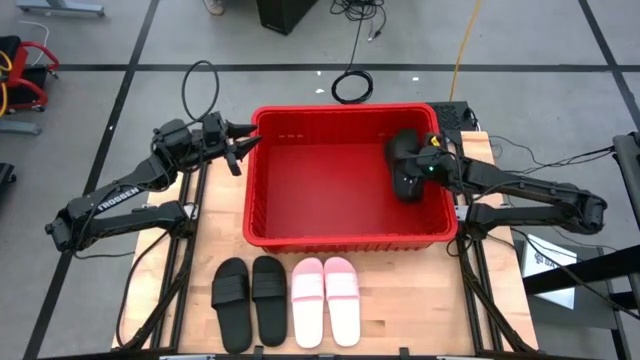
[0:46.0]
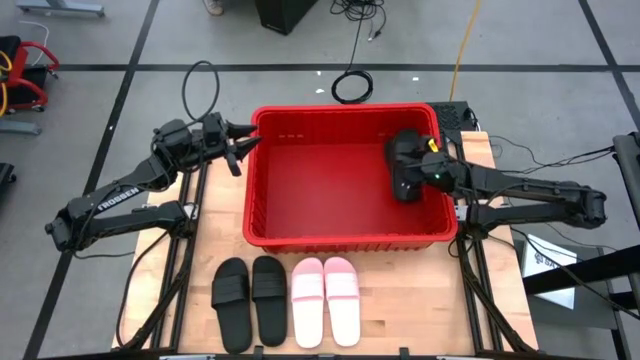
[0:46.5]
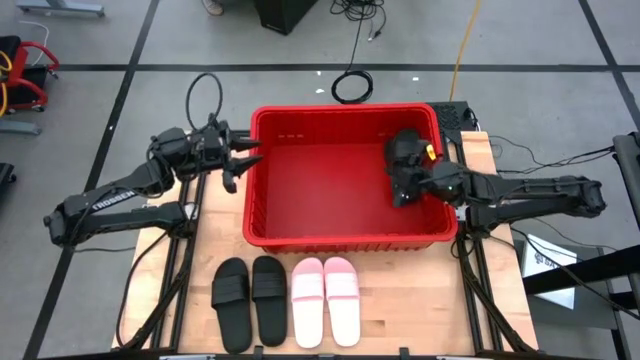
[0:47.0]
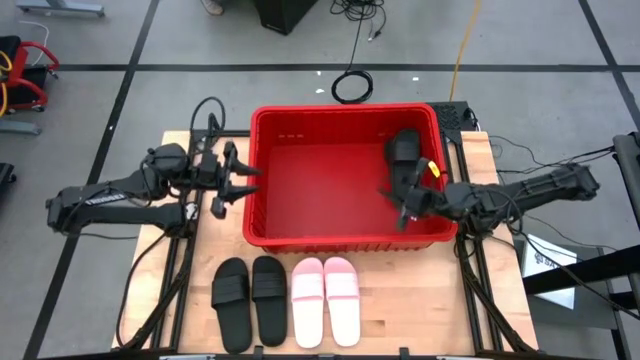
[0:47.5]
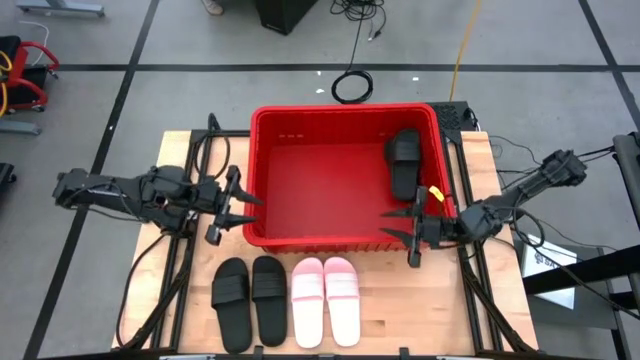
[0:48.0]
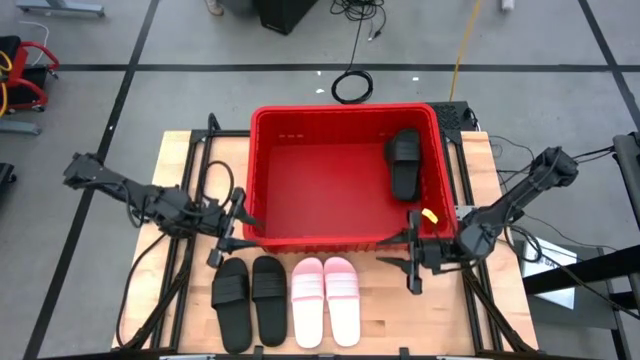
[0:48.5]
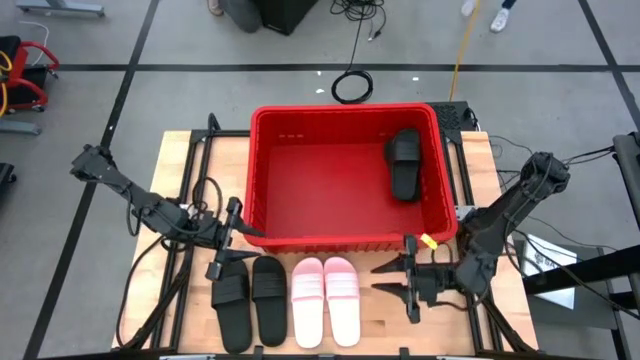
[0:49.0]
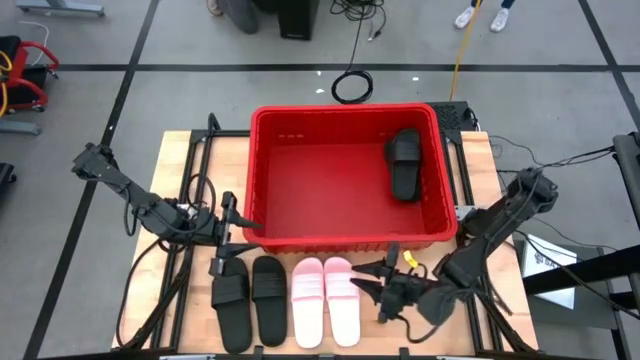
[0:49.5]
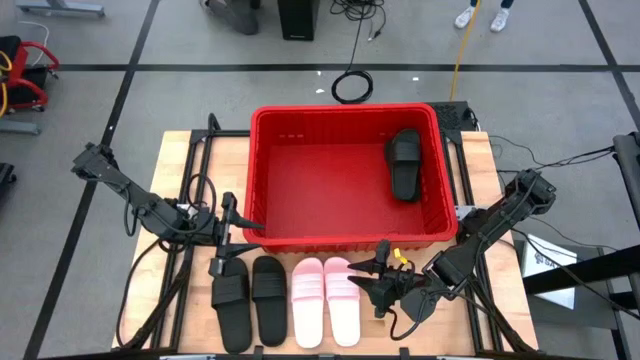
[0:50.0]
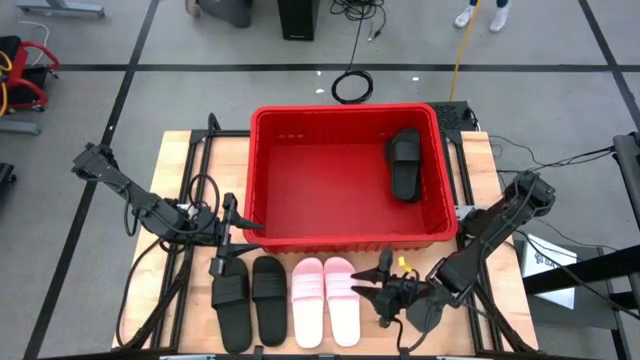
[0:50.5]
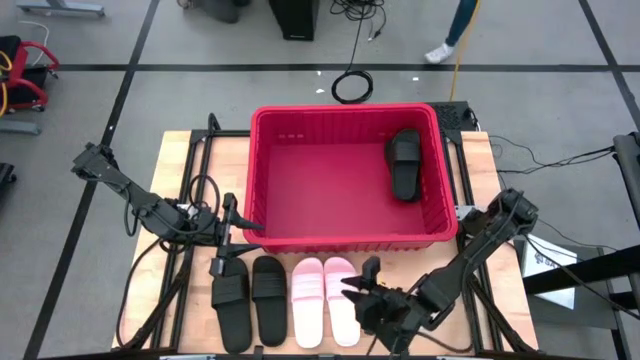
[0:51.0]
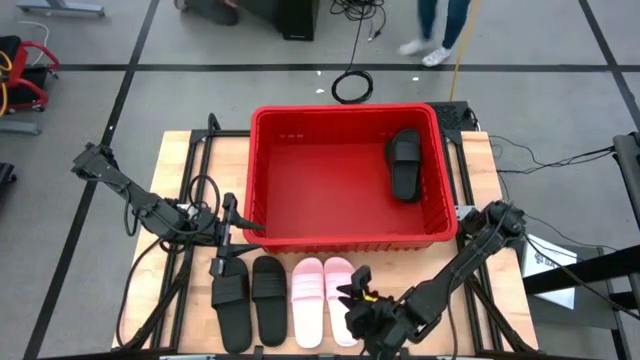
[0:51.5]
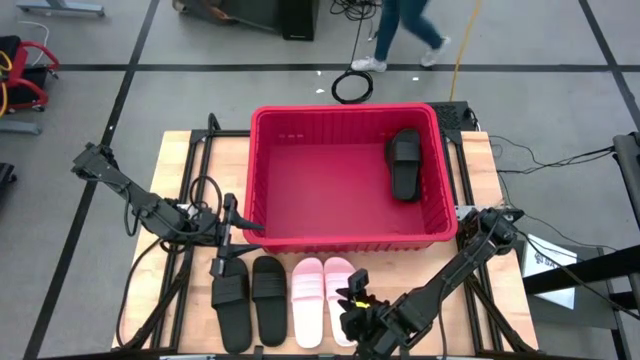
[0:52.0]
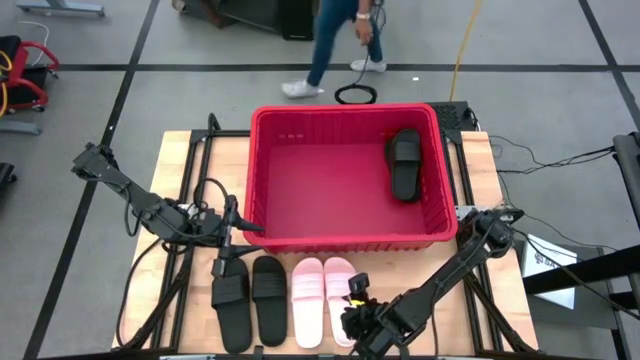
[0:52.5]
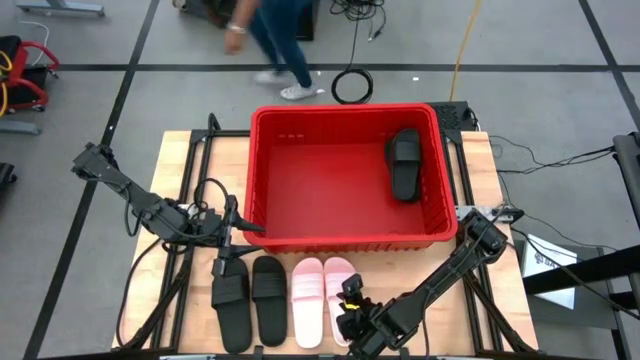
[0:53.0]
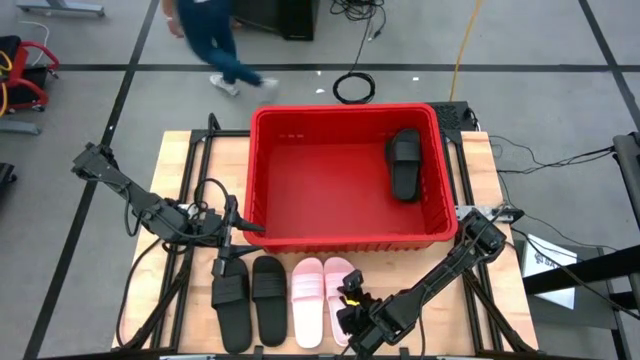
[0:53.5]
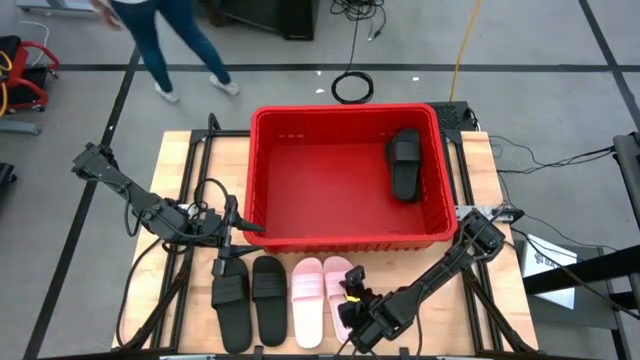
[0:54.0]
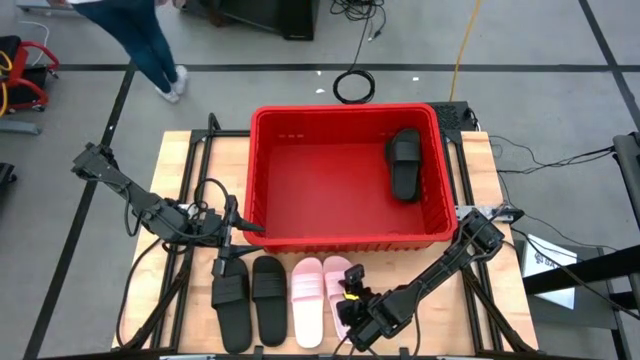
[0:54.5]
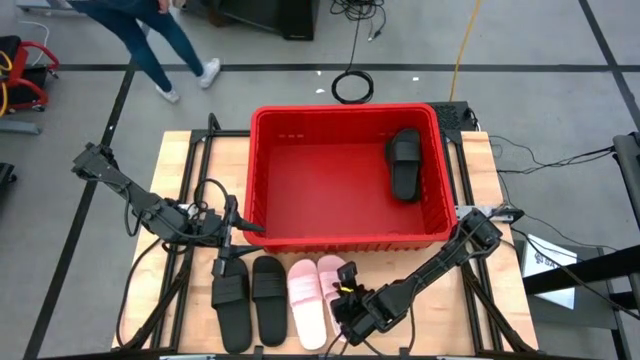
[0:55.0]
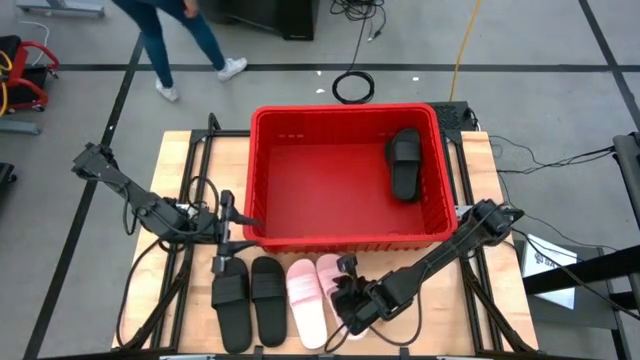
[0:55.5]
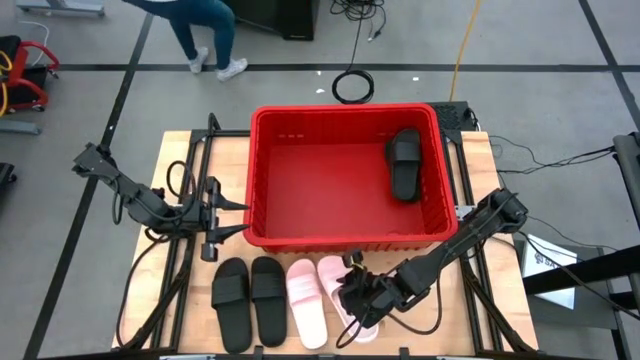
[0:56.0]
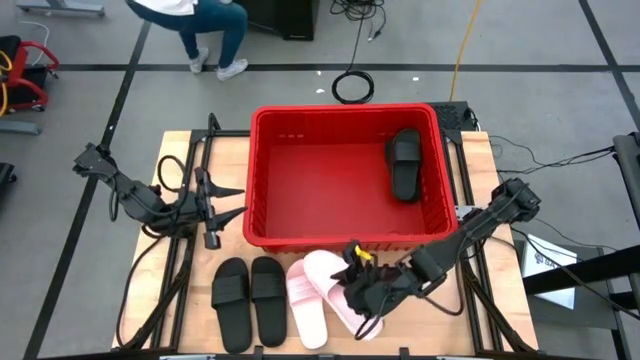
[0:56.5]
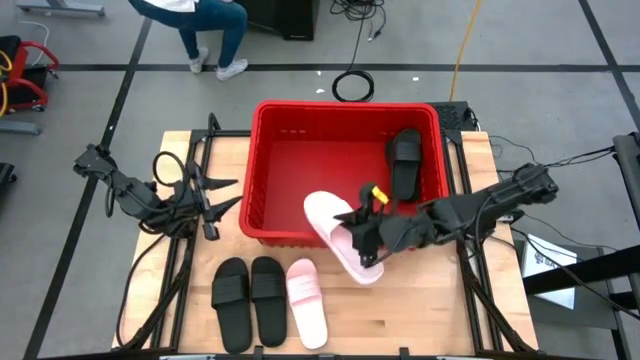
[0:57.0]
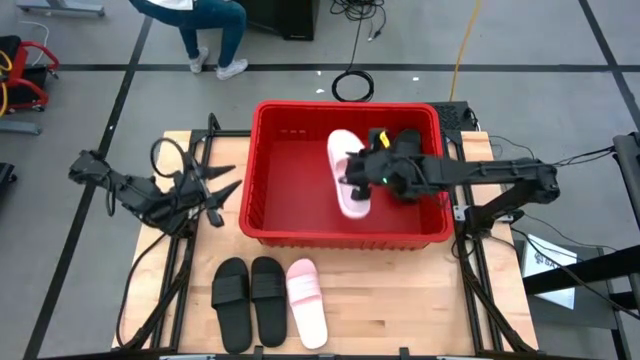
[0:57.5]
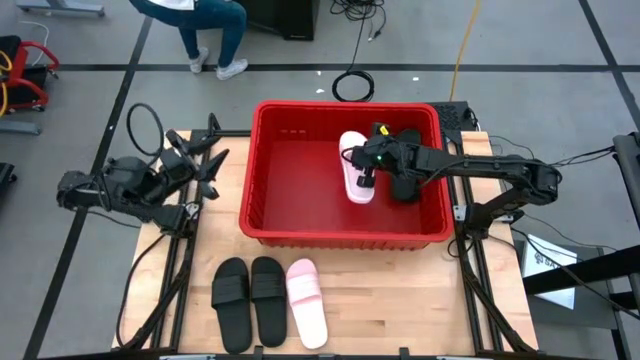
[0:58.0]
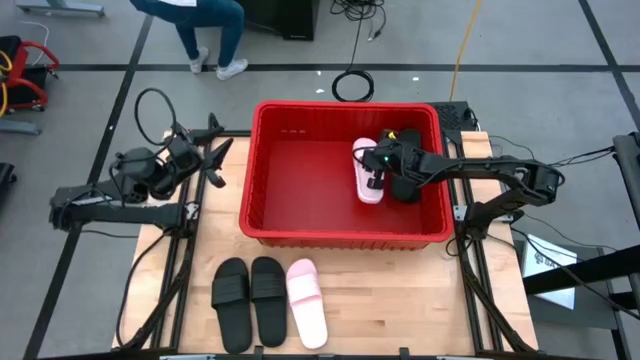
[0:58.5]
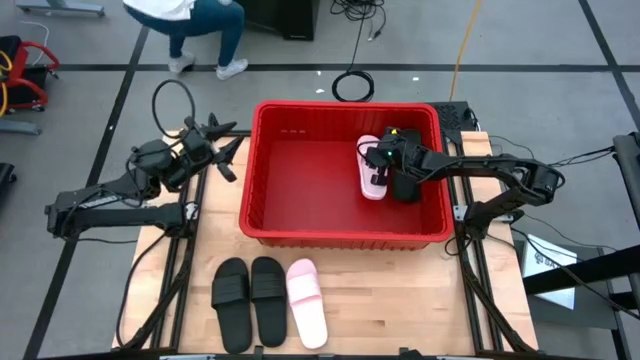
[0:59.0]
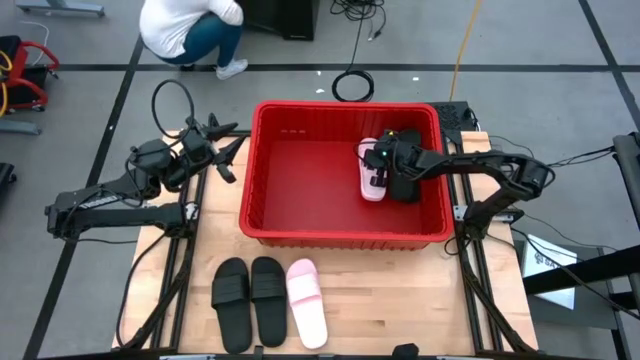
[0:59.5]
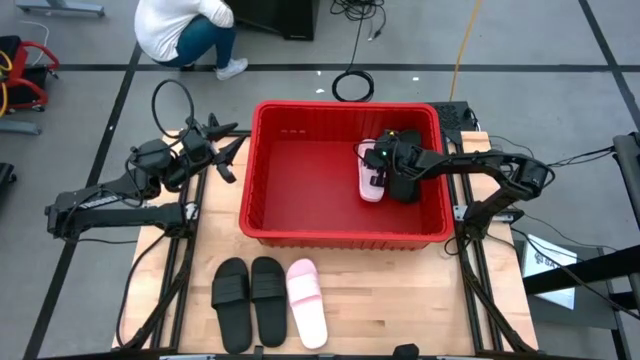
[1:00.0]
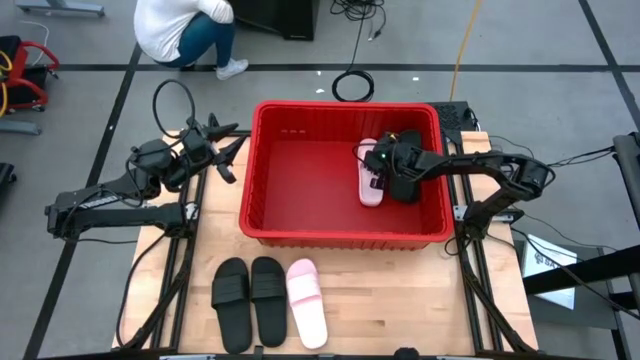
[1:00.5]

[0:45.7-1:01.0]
Task: Pick and place slides into bin
Put the right pink slide into the bin
